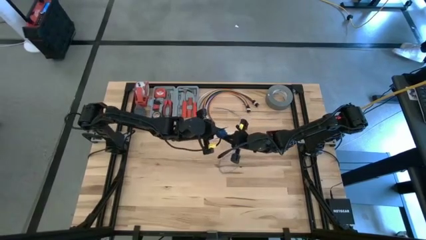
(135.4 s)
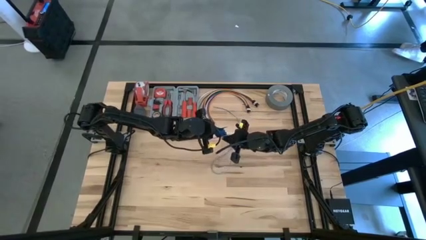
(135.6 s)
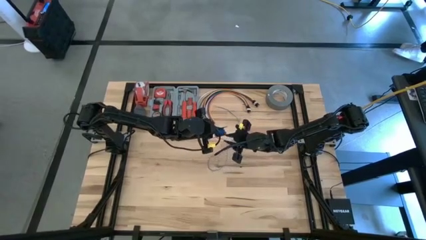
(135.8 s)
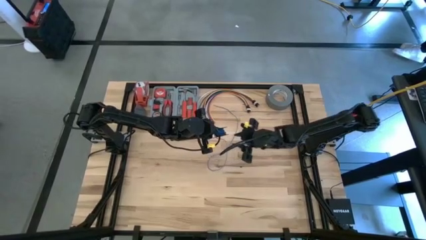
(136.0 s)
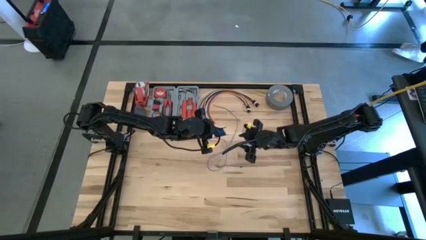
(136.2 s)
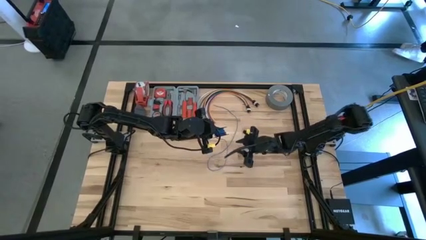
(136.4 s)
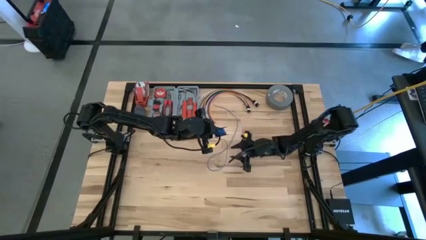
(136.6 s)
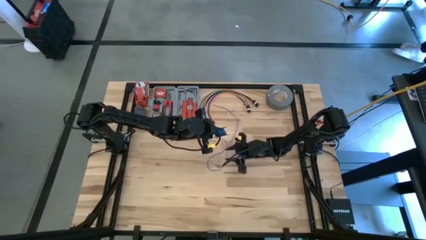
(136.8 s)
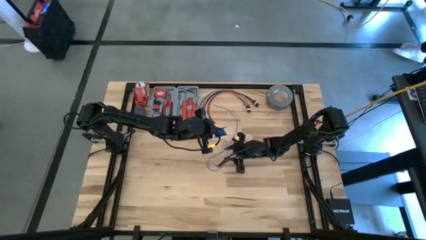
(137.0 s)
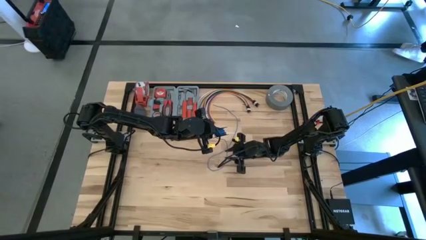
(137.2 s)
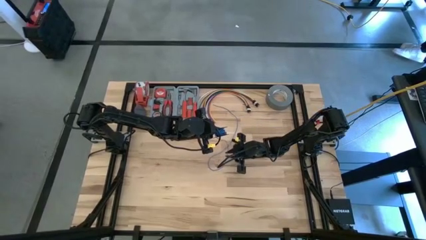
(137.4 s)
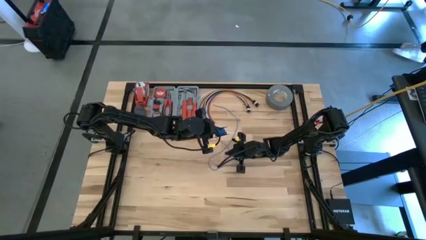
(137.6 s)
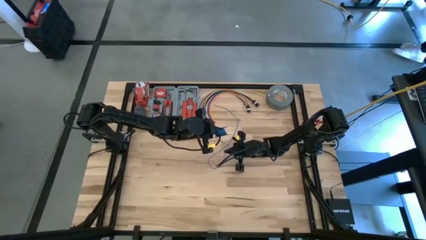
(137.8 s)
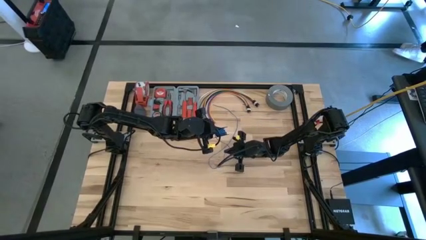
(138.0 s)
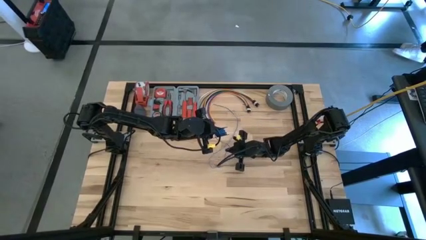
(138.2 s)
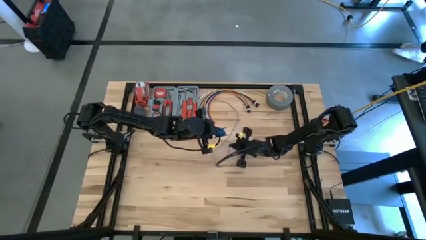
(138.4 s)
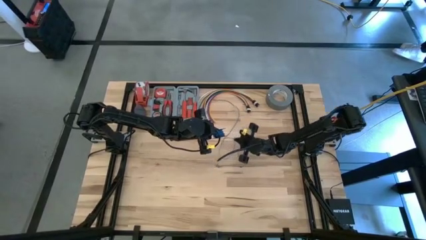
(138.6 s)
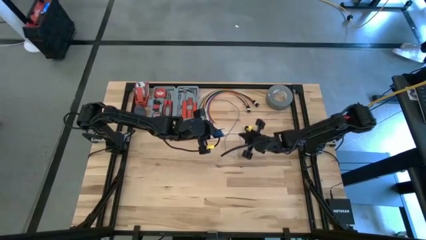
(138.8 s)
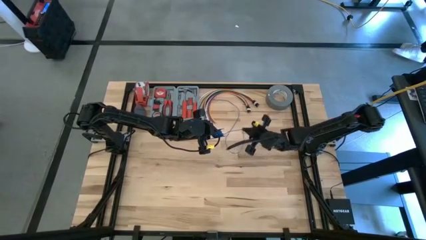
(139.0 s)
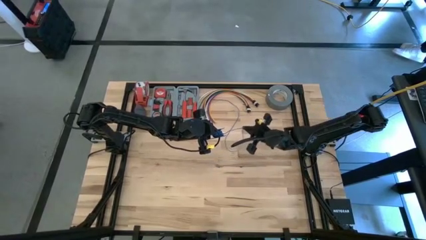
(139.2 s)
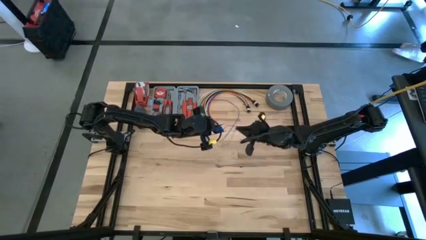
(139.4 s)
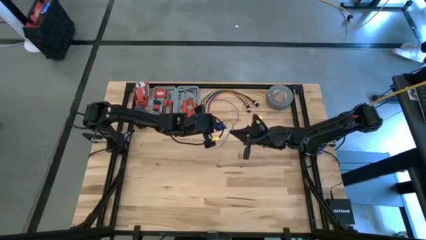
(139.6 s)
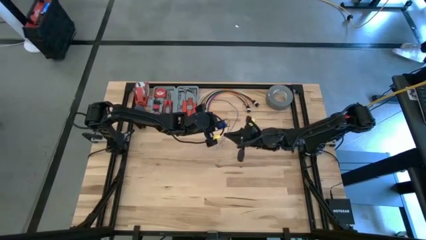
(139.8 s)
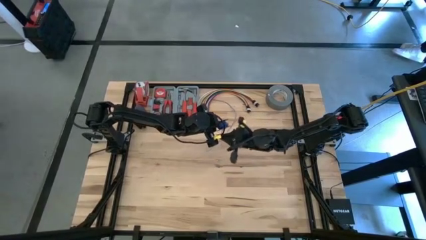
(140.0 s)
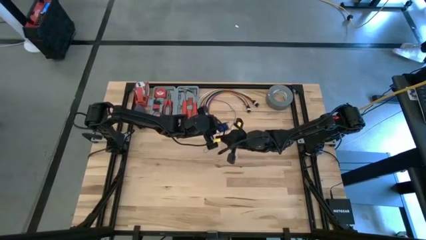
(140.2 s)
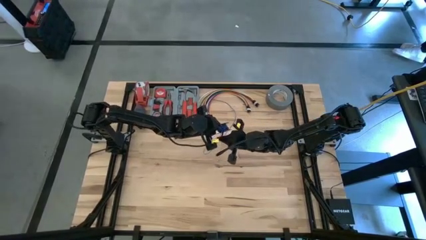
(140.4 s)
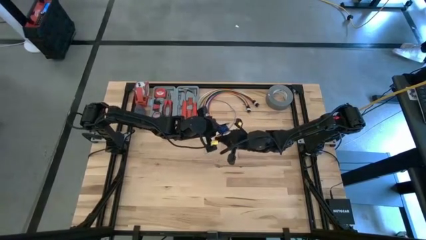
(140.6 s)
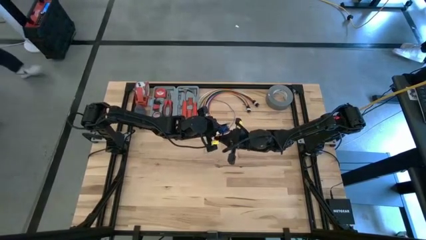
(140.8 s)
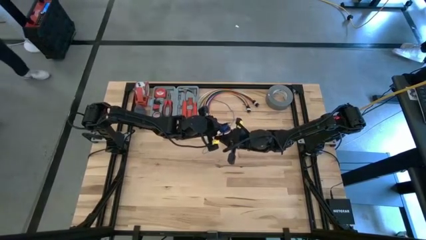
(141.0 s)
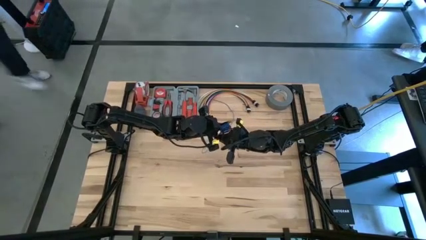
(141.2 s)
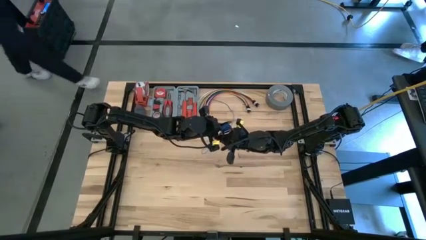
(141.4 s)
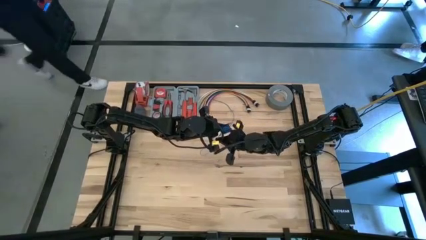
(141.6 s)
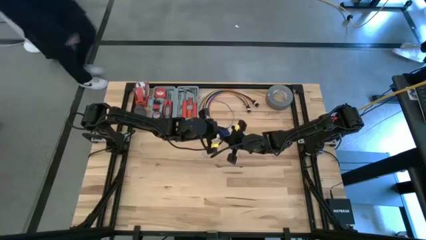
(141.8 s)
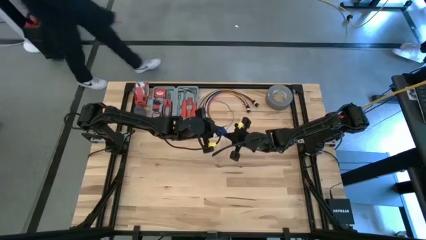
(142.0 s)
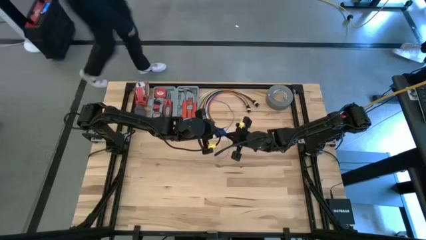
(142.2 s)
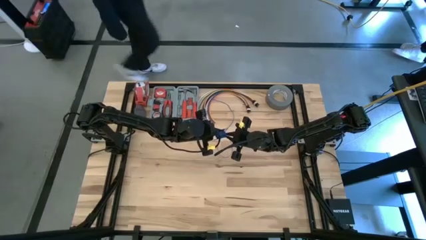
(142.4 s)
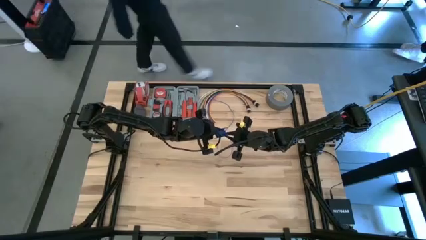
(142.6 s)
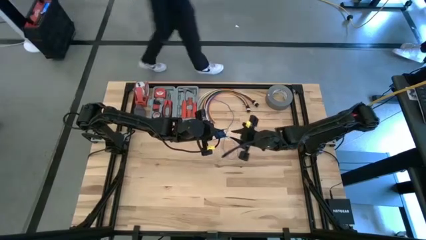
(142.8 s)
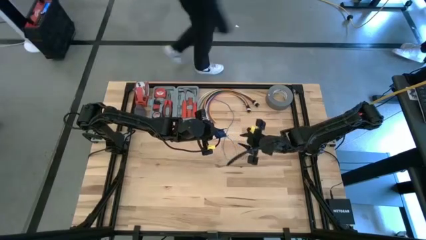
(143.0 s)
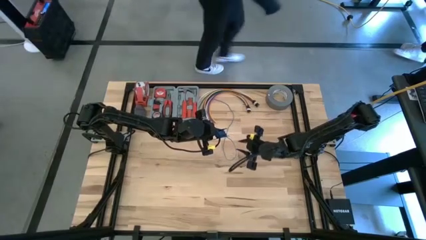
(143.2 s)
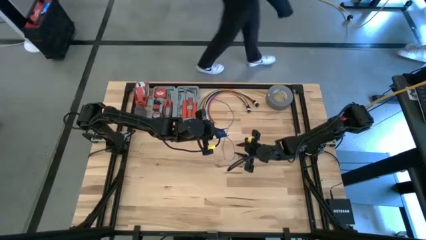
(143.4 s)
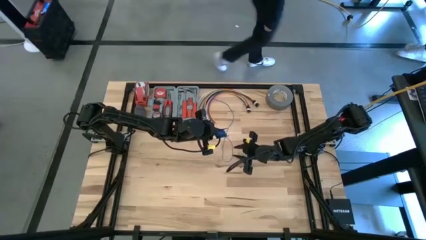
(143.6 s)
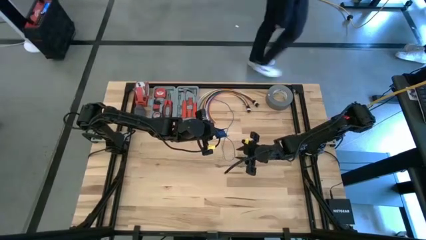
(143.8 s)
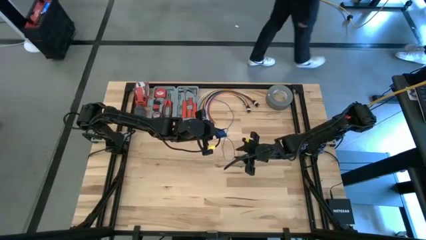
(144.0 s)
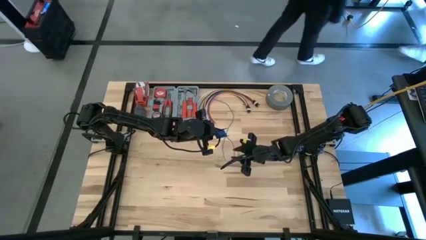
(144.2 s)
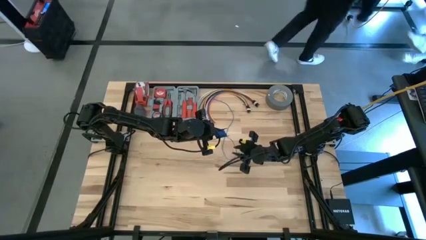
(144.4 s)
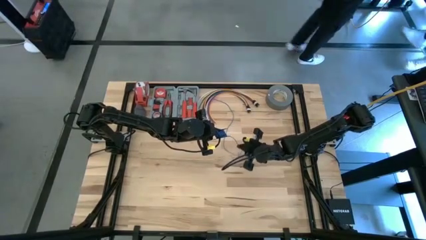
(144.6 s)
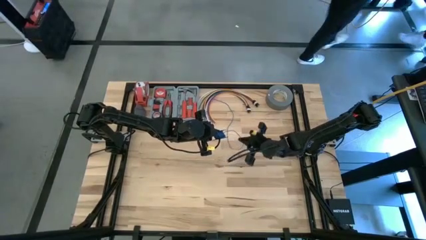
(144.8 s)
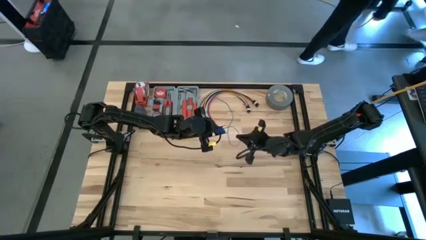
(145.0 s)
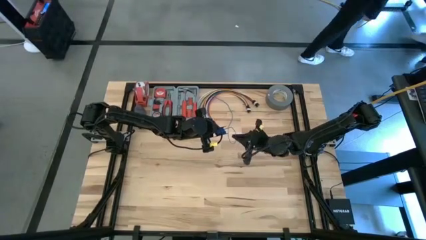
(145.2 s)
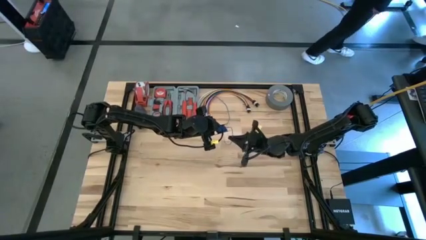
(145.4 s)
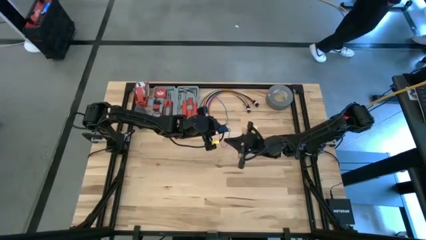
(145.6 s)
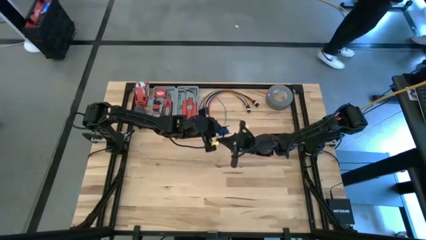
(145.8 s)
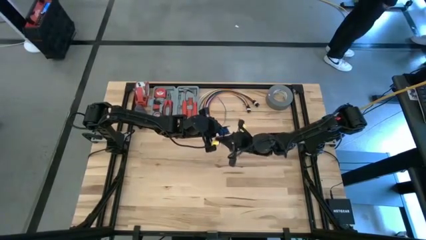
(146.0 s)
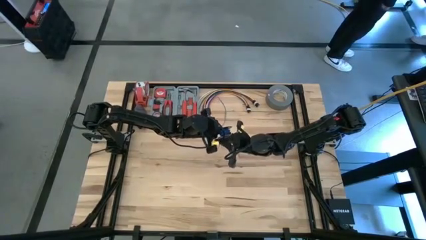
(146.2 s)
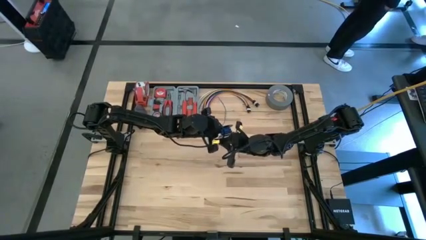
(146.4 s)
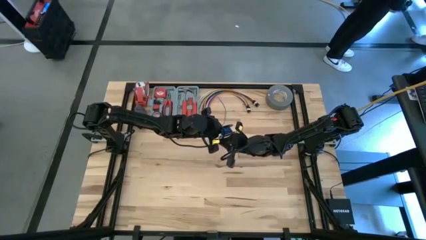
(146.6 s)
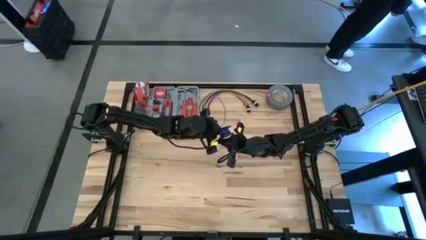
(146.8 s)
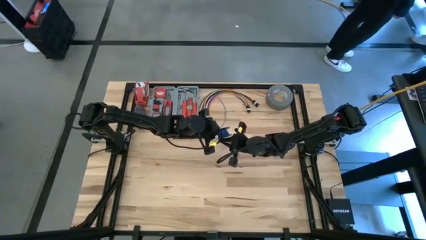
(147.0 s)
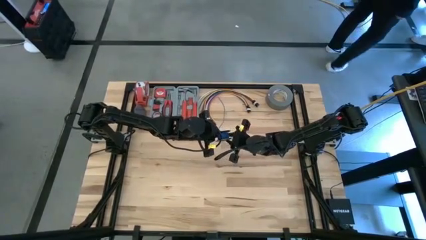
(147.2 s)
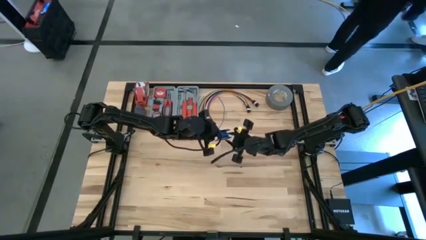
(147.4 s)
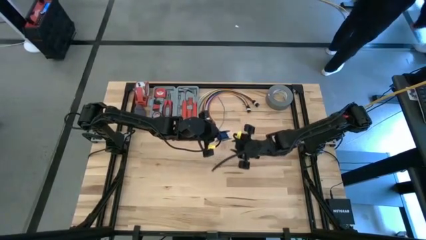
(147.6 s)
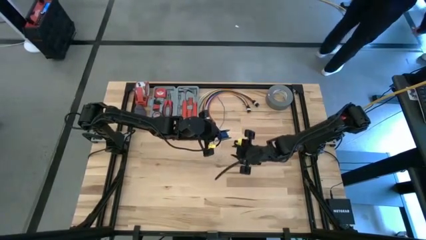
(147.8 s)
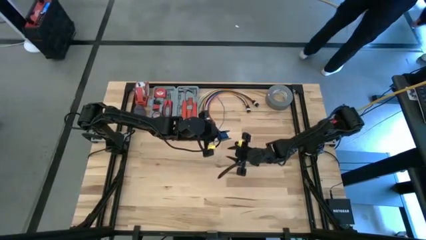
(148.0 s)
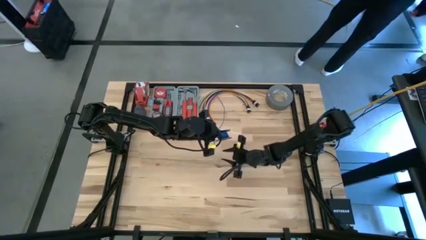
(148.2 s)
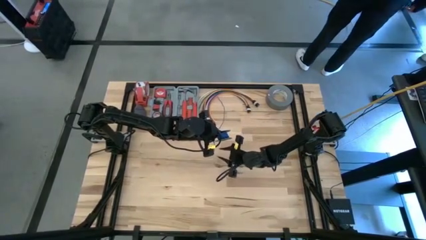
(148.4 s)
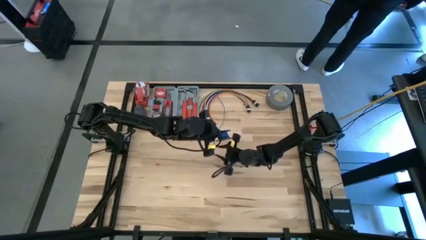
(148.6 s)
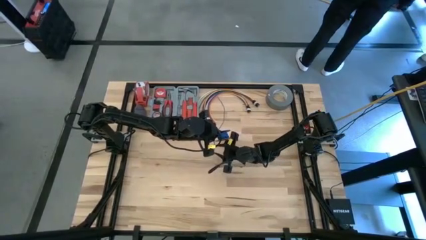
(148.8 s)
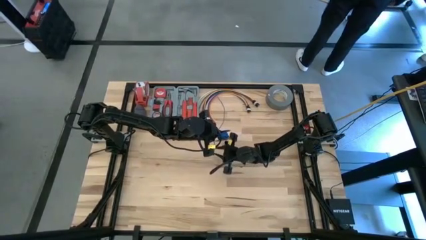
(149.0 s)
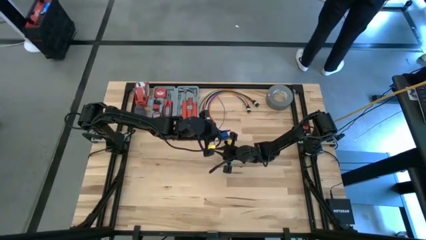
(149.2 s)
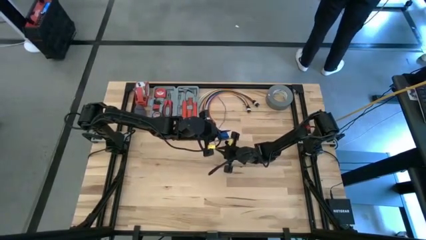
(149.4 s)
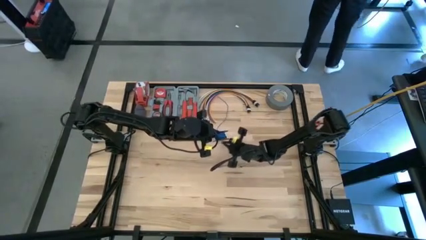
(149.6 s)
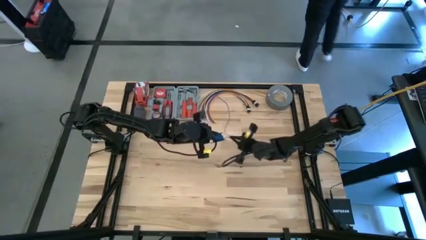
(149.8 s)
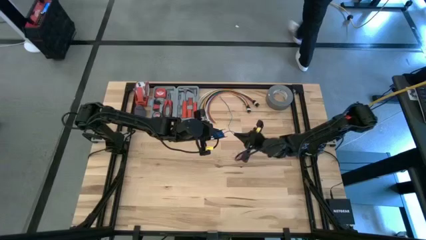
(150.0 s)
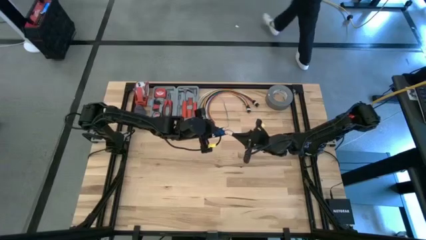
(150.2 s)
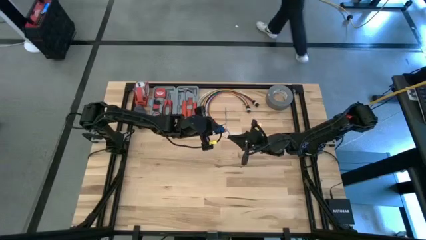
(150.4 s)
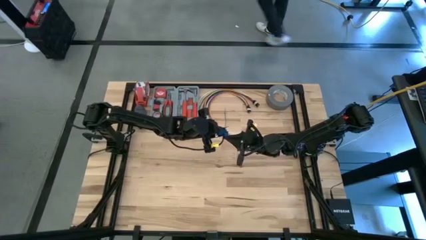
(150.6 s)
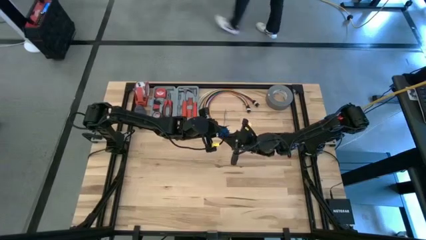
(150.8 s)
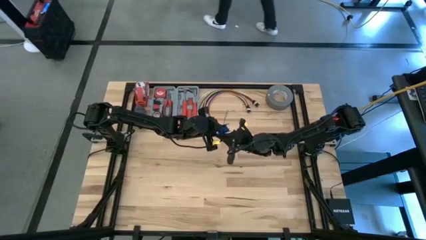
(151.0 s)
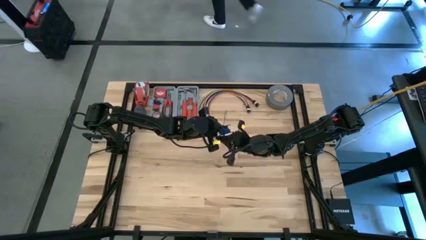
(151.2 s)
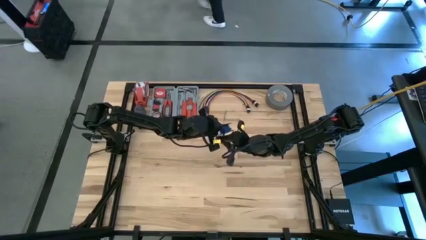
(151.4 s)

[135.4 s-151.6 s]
Task: Coil cords
Coil the blue wire onto the black spool
